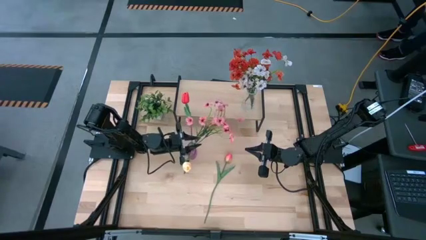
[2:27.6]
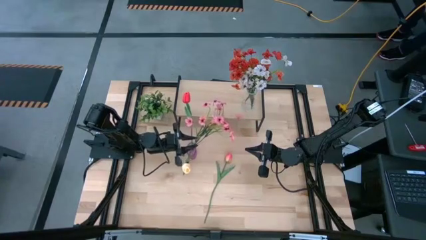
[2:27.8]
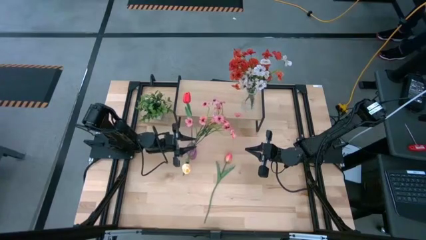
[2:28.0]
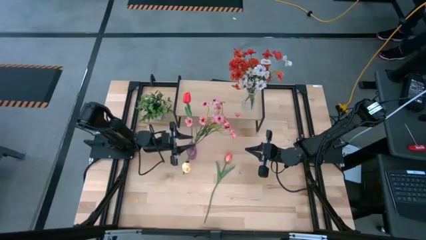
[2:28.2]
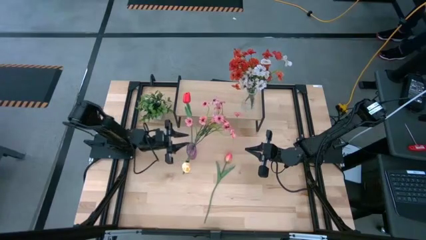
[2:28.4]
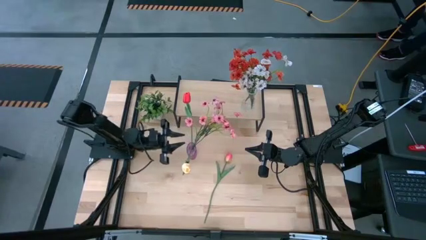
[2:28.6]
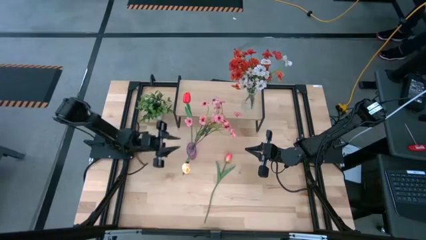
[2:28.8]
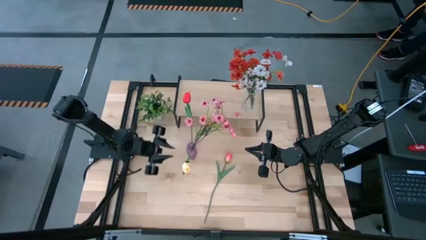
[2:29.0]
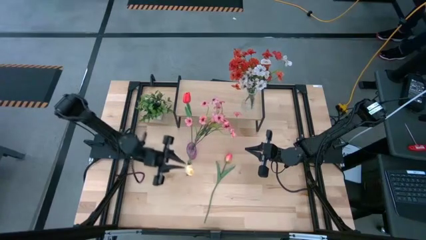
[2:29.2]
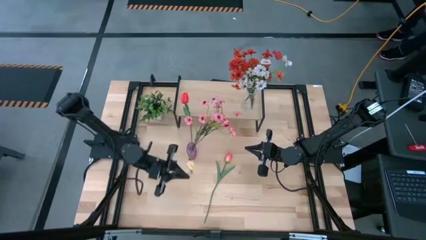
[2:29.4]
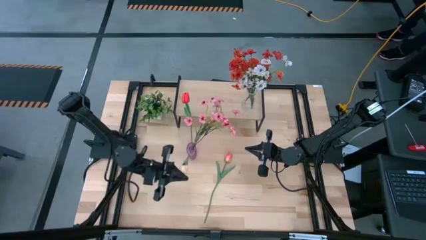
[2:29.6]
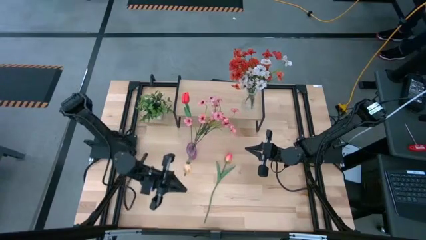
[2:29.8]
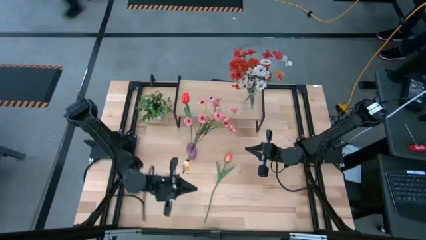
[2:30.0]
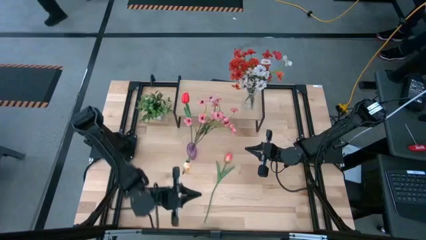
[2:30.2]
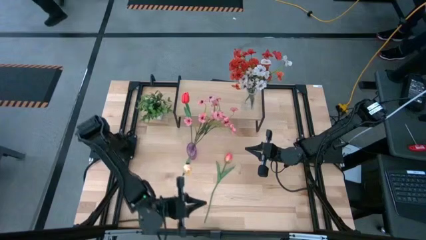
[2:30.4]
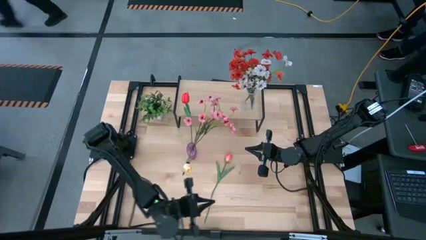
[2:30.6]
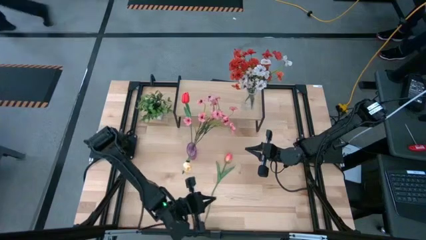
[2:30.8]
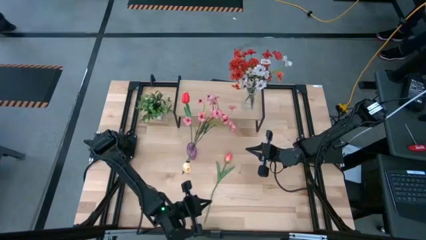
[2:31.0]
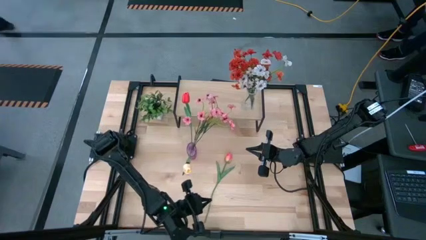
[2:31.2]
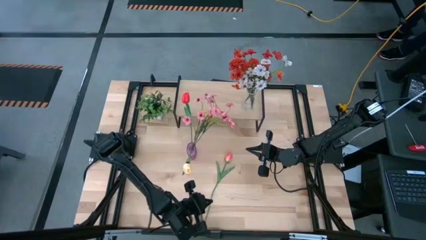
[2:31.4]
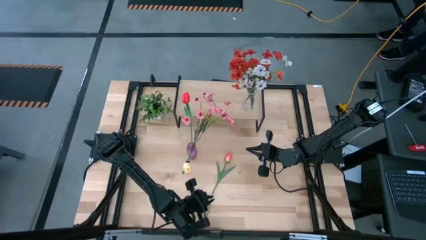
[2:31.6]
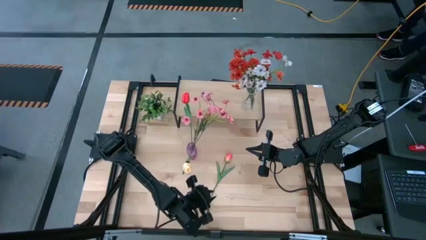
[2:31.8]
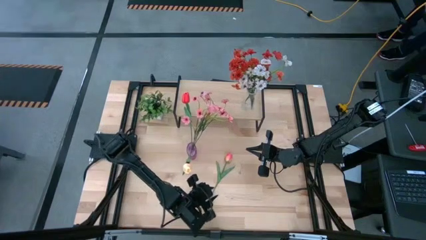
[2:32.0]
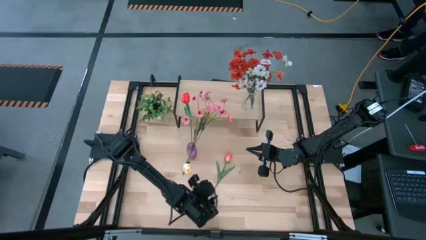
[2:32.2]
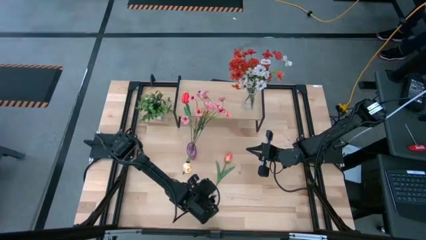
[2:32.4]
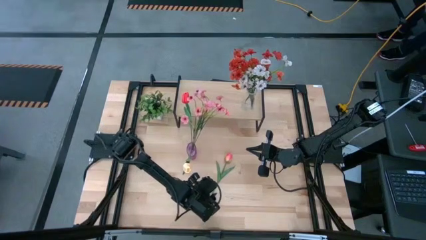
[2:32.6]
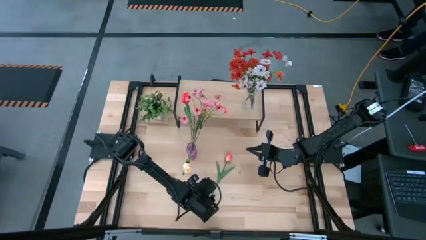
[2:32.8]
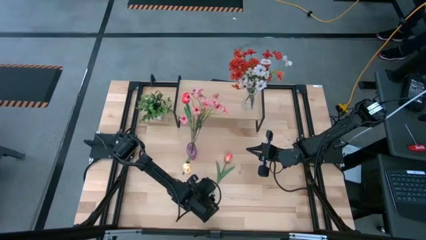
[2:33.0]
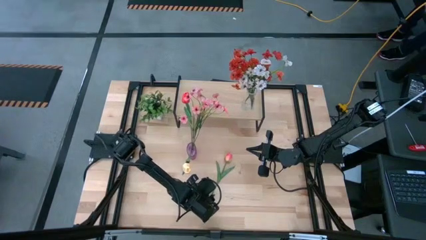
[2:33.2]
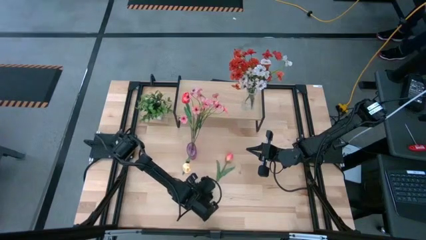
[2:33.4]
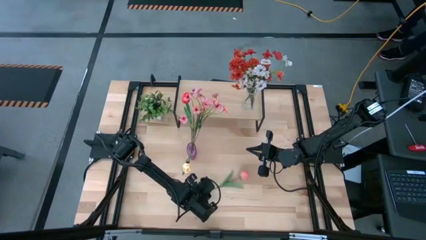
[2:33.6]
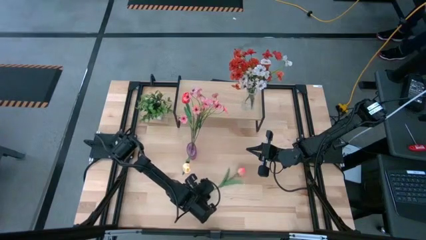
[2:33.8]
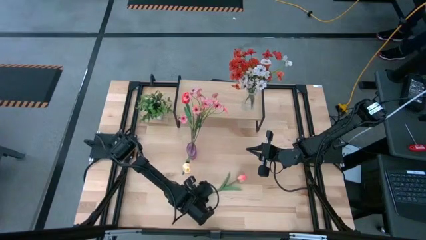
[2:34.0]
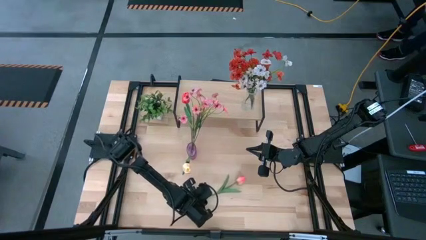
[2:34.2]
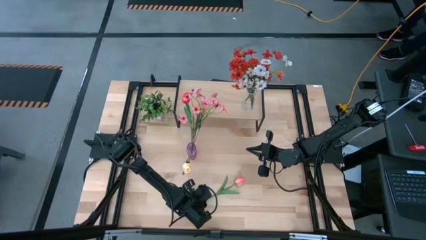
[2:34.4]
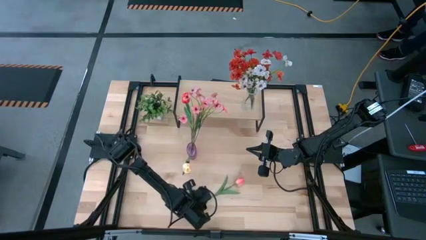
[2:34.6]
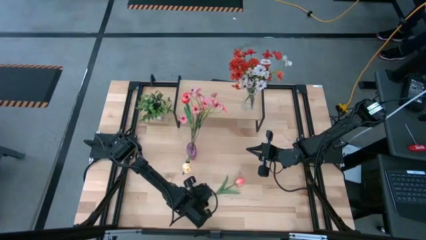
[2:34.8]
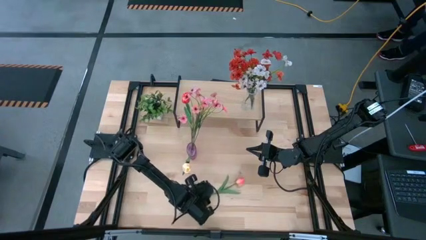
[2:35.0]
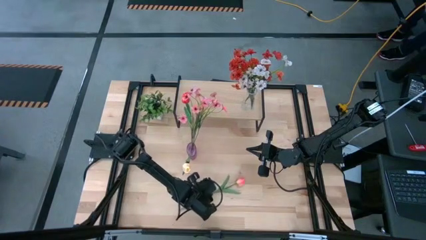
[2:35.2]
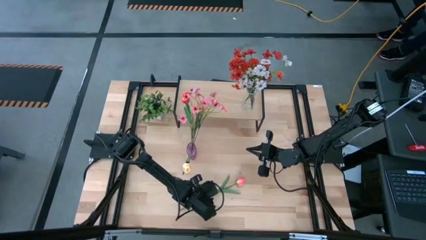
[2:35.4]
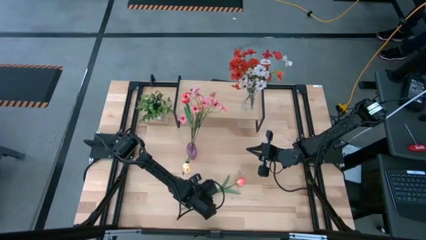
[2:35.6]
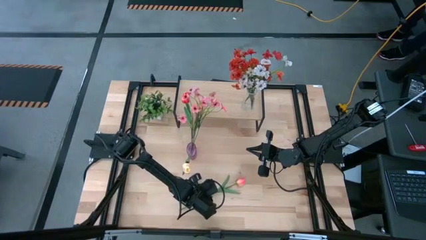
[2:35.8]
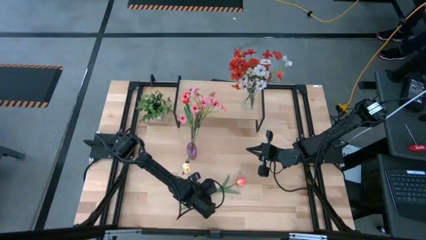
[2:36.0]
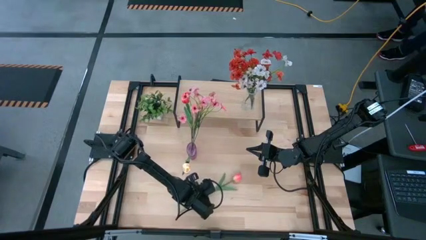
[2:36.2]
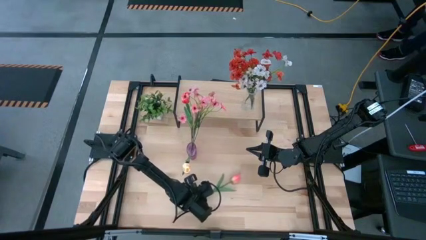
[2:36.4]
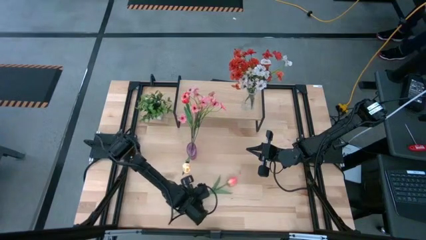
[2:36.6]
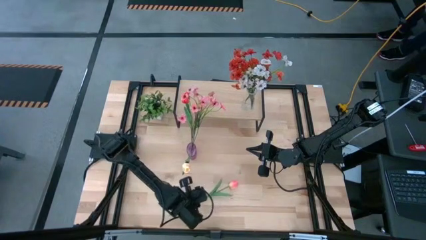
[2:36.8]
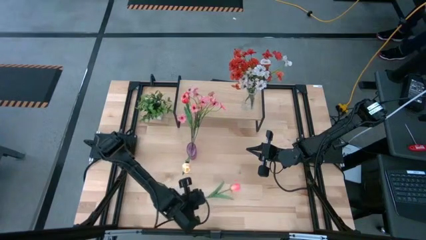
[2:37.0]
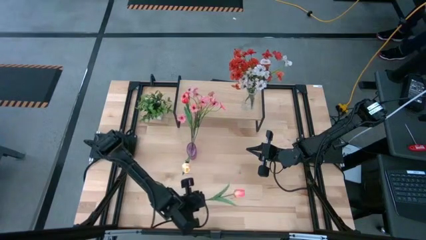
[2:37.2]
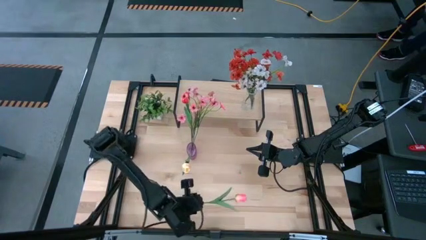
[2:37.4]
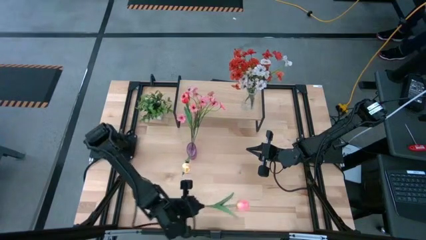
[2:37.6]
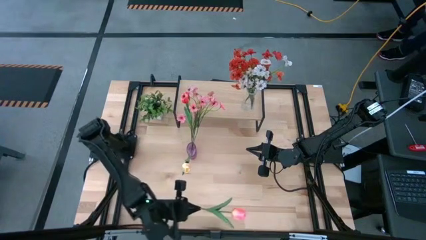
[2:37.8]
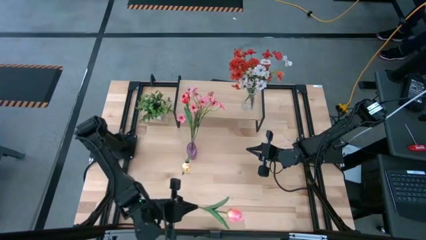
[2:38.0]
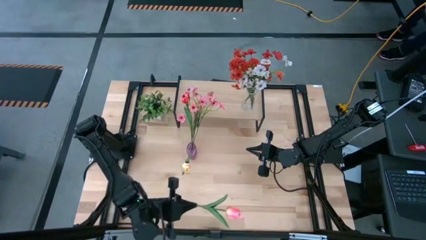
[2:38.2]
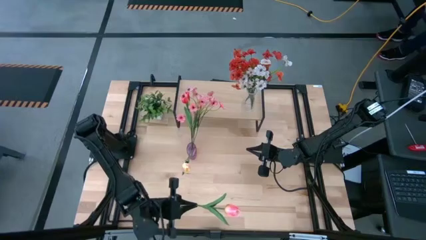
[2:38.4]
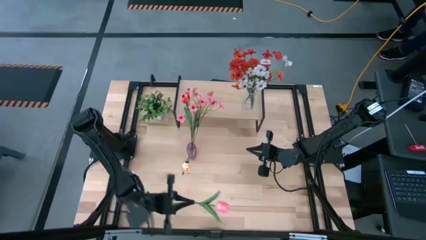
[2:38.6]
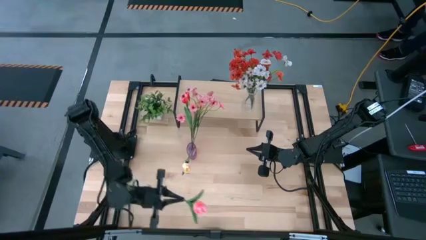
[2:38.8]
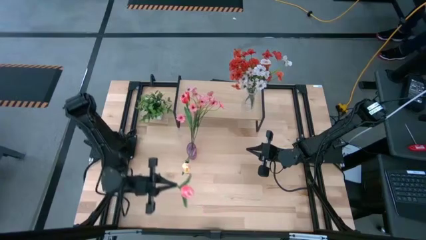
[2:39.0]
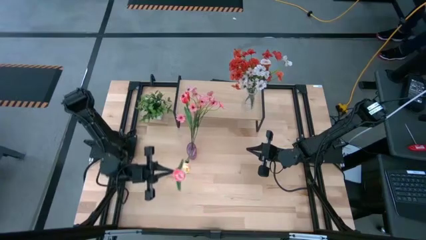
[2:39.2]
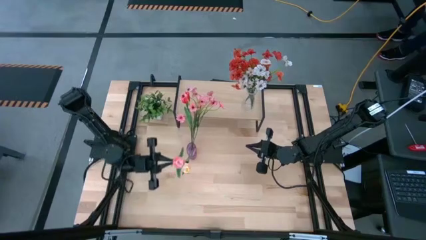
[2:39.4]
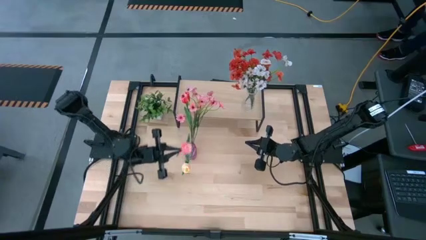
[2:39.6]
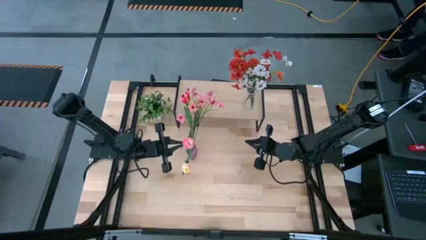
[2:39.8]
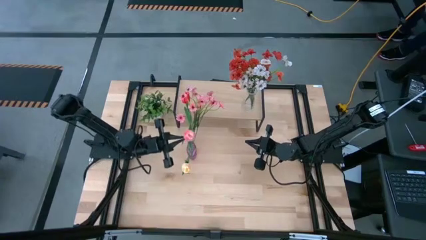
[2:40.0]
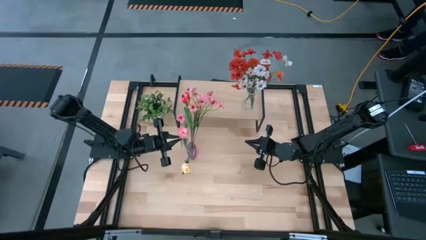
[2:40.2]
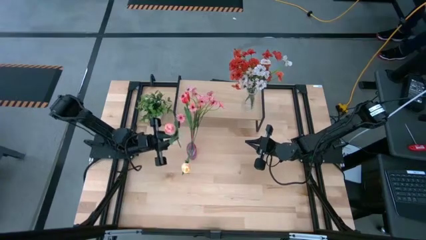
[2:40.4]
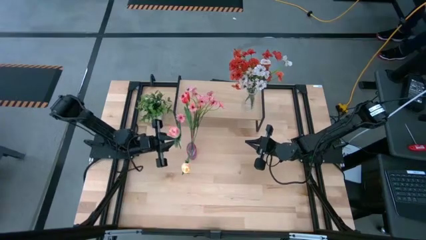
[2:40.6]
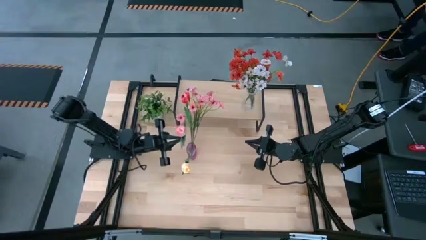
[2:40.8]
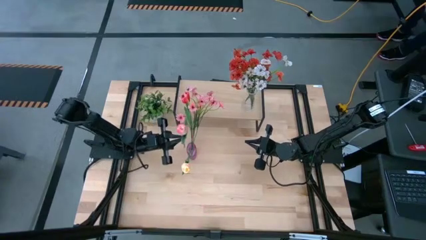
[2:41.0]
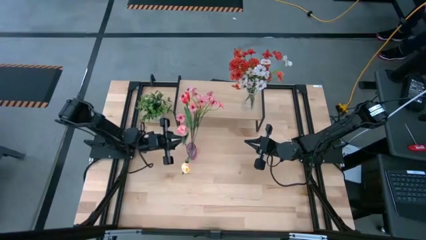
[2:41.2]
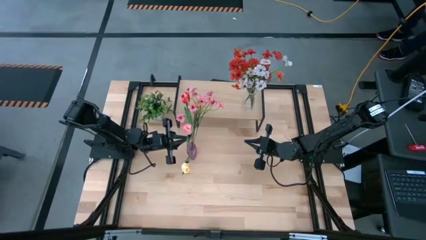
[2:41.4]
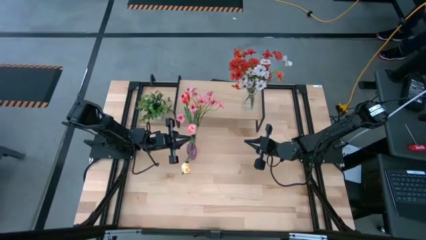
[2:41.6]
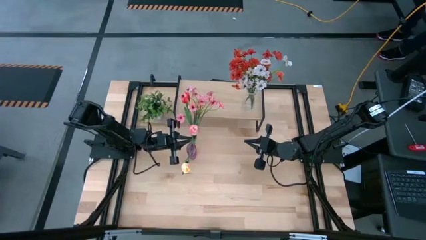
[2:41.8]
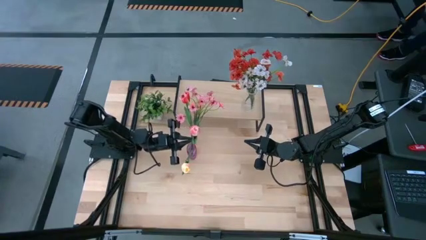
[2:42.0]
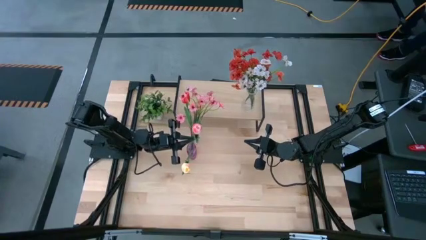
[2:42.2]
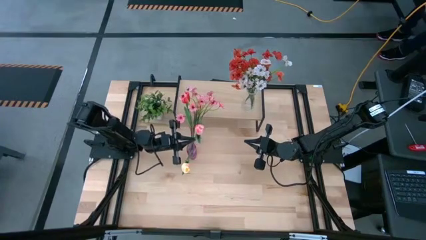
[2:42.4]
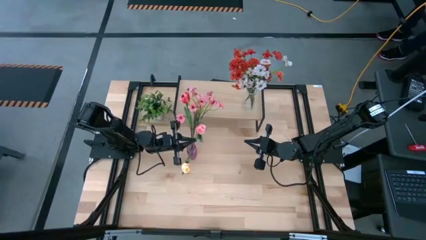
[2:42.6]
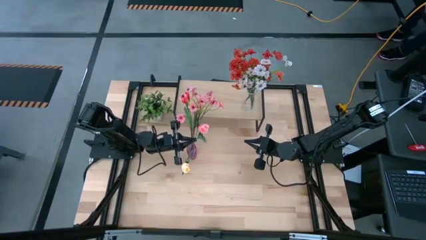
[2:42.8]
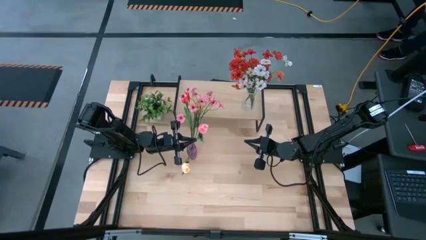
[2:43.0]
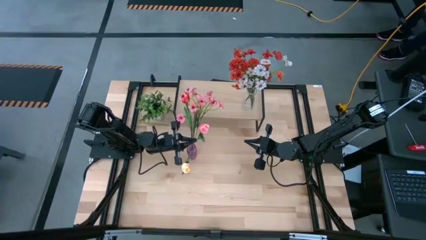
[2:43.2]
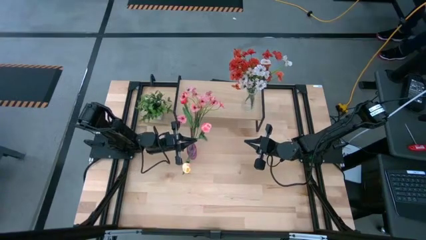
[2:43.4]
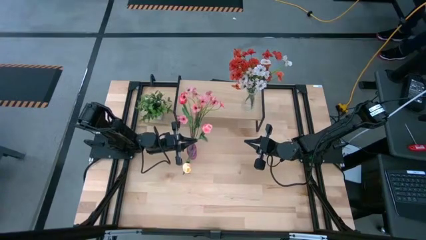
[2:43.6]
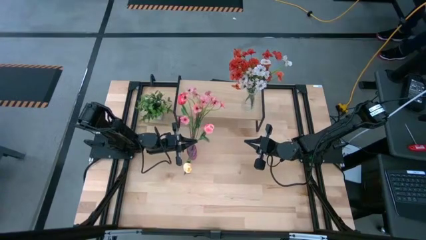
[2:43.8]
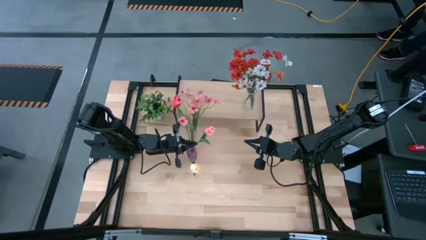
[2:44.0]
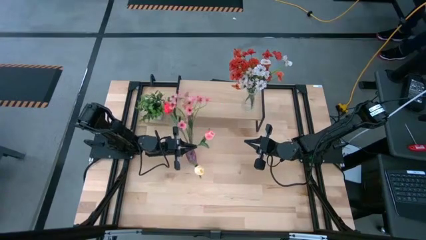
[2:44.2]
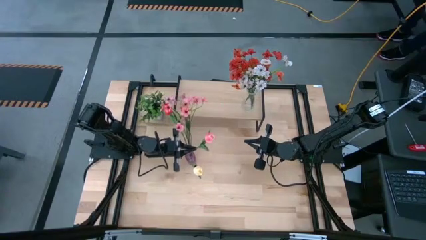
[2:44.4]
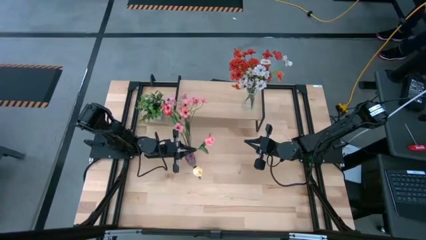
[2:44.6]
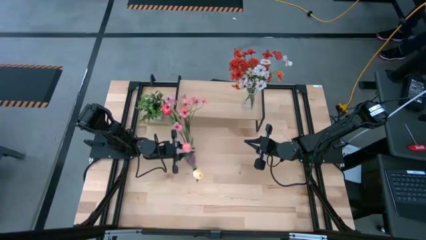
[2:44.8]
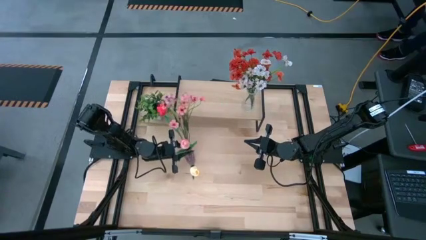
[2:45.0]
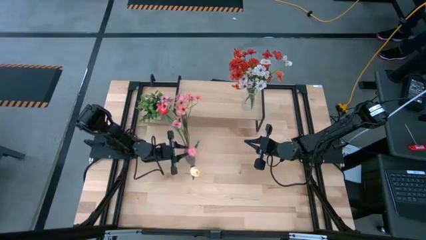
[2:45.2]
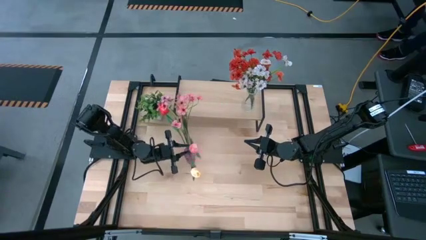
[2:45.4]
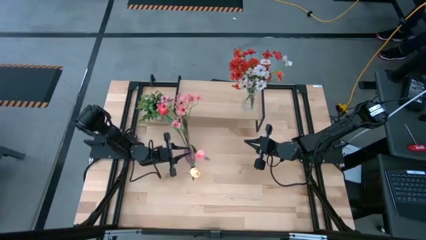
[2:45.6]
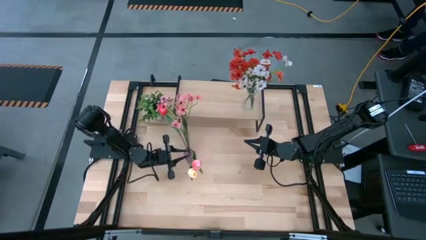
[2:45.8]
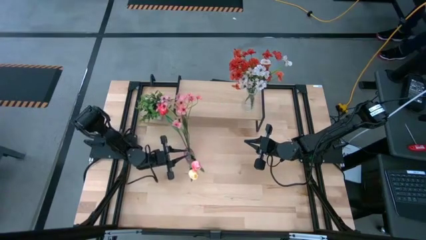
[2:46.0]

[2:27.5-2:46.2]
Task: Pick and place flowers into a vace then onto a shelf
Put the pink flower into the purple vase
